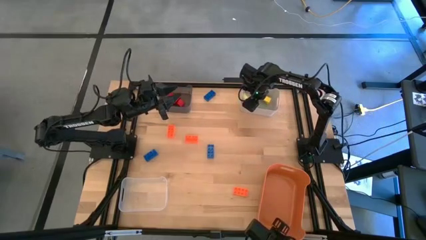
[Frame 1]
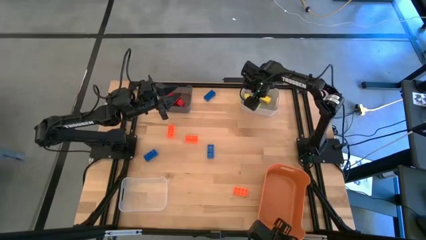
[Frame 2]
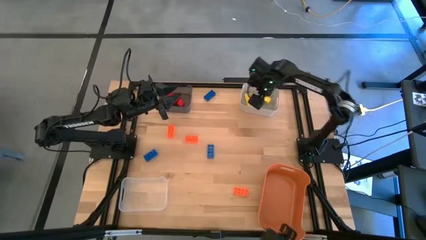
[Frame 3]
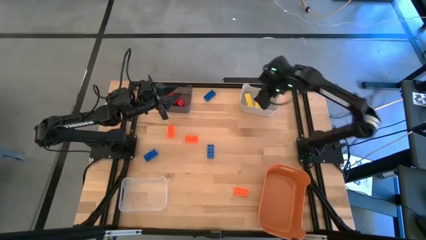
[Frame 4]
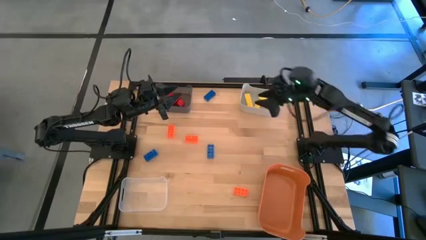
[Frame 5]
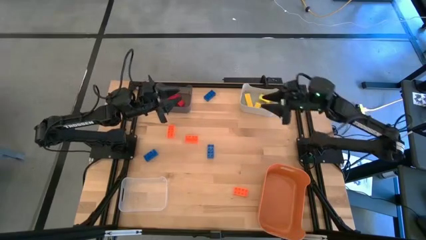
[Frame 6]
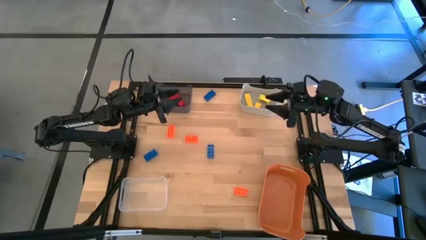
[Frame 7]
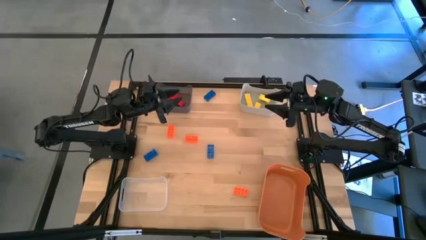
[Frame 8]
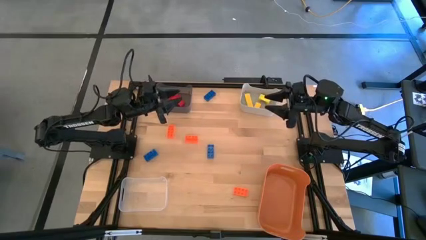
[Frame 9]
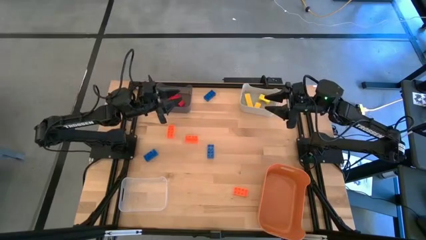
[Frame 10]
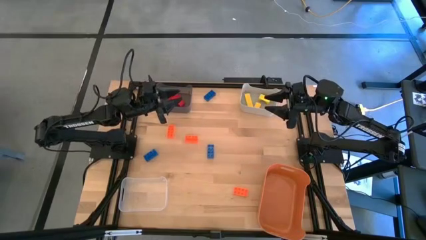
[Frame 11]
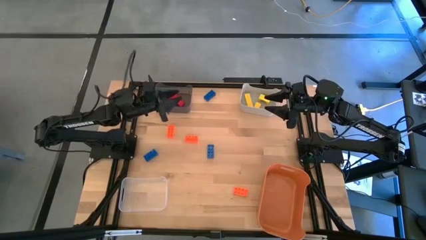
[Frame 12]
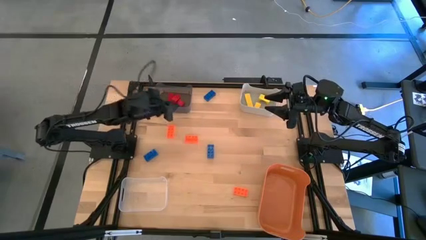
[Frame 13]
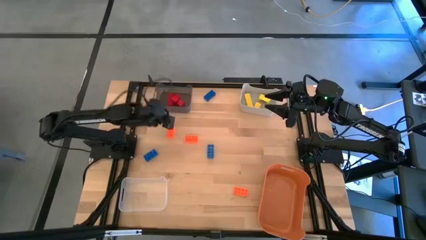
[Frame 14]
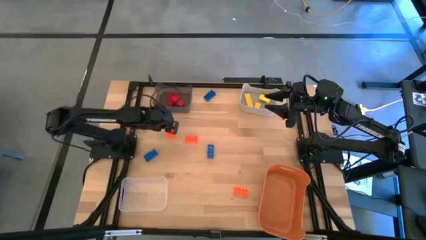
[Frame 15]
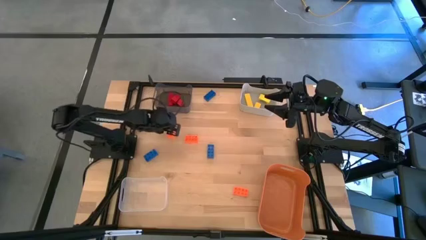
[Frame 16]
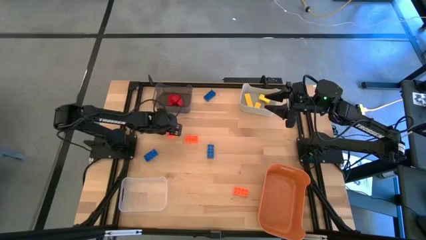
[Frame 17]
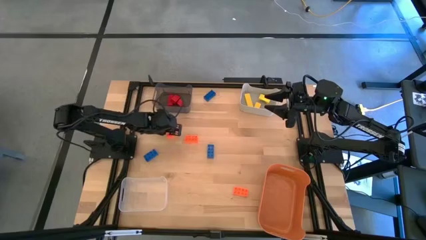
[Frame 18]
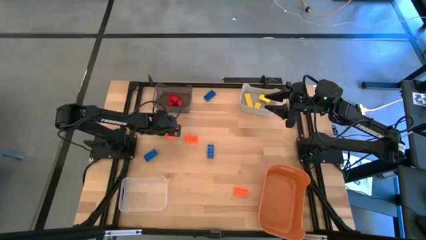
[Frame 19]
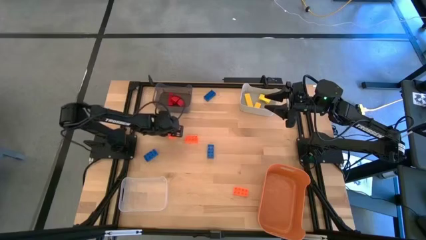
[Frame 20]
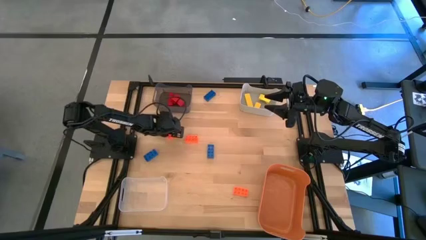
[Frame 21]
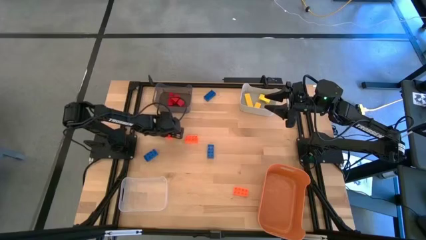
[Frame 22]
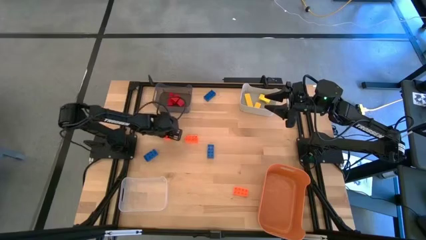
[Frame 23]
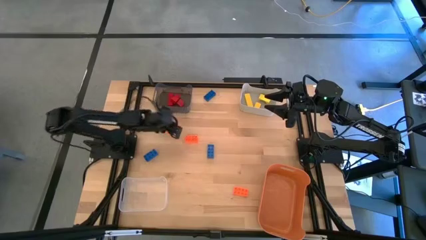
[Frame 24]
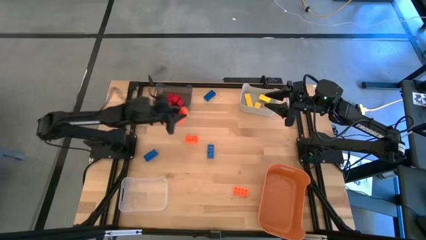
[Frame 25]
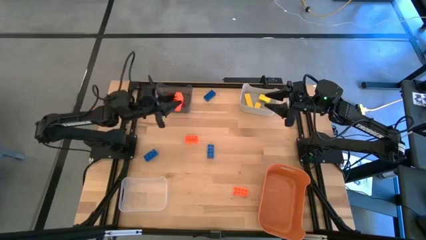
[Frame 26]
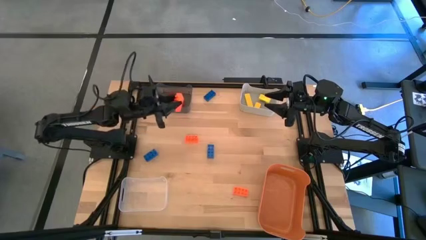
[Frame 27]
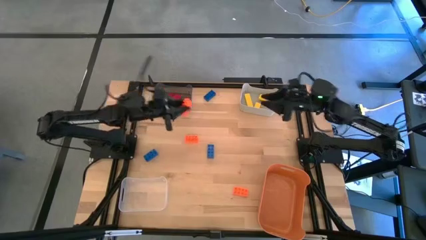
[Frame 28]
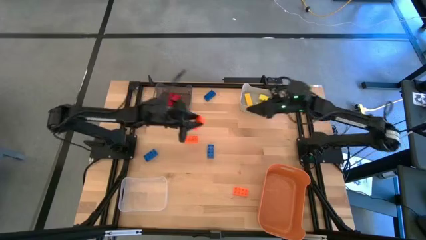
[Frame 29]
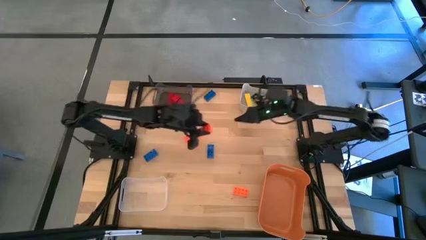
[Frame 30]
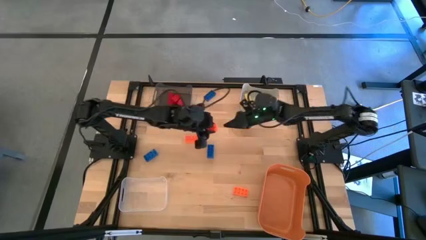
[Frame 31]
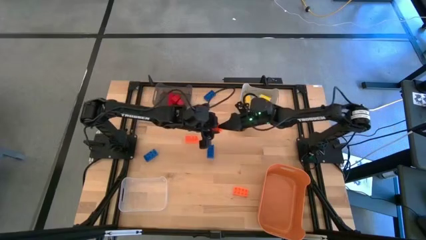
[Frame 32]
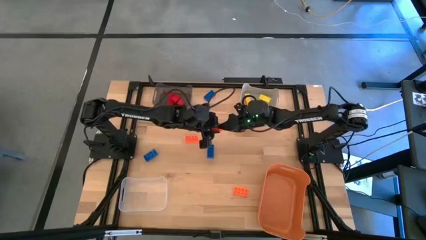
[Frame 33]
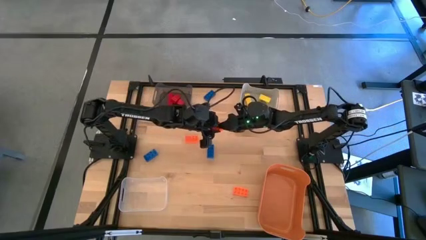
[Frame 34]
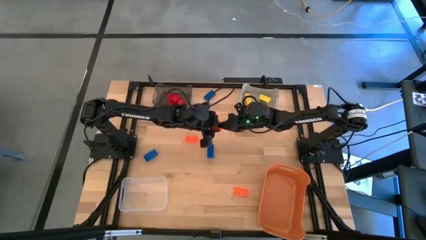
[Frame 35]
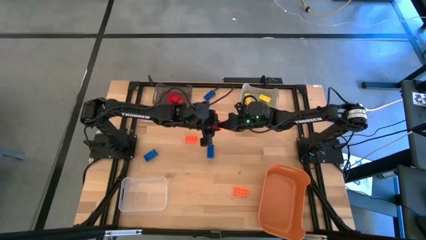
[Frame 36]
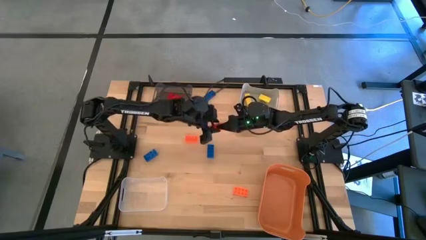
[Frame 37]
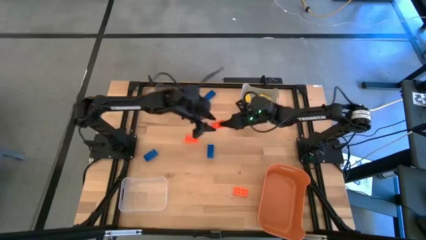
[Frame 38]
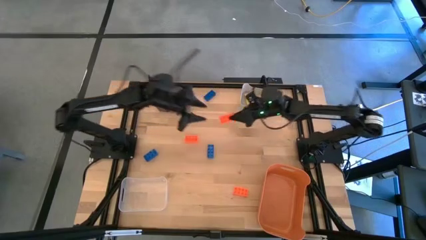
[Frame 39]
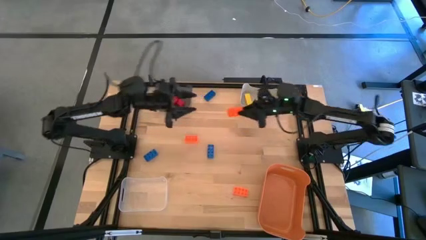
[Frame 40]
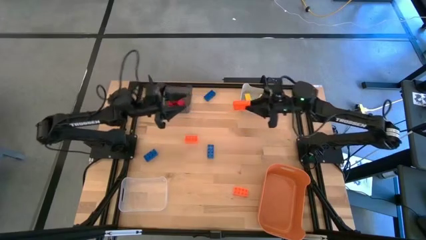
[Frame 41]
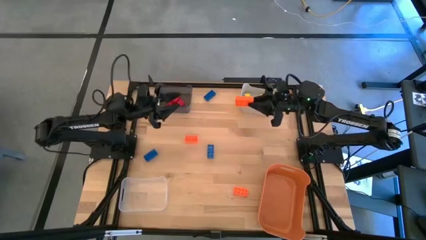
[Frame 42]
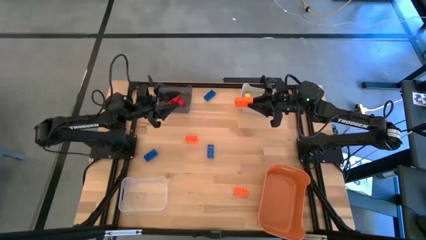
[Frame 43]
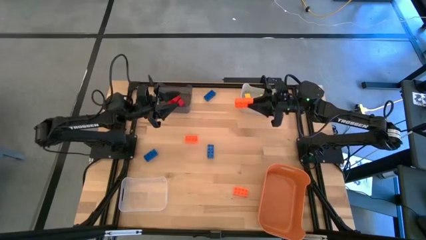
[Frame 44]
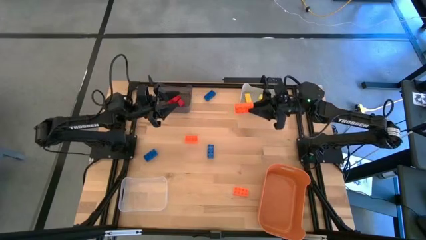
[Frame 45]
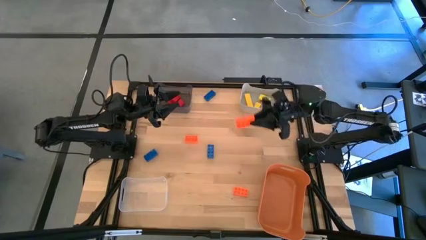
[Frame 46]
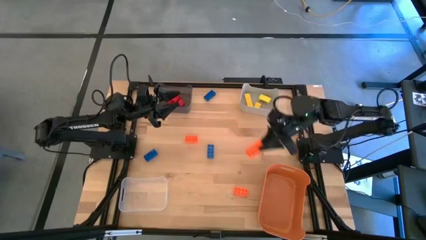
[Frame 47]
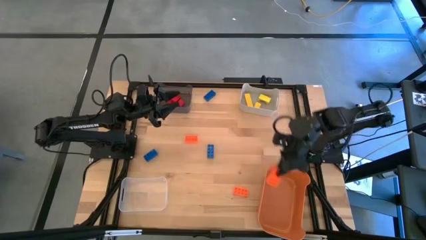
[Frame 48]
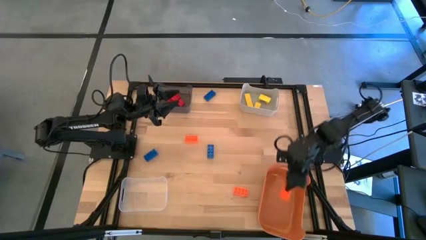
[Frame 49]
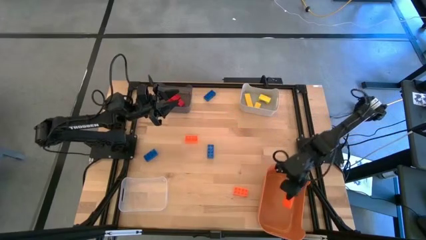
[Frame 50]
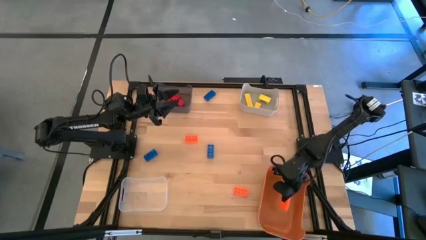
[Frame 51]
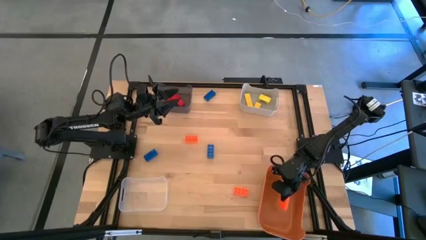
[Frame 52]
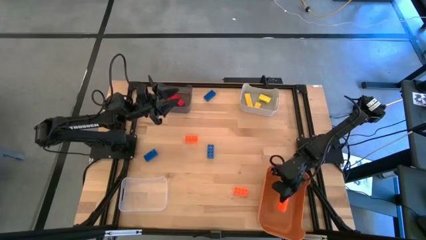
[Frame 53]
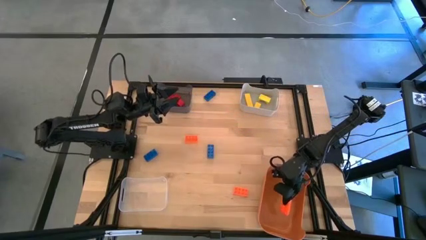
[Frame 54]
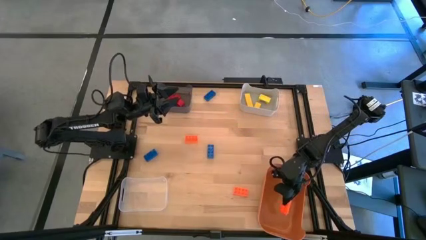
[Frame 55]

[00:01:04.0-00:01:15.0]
Task: Sort & place blocks by color
Put the top left orange game piece into the orange bin
